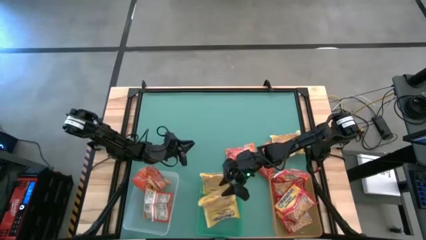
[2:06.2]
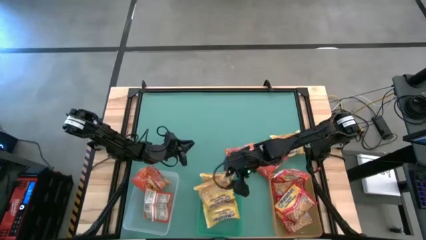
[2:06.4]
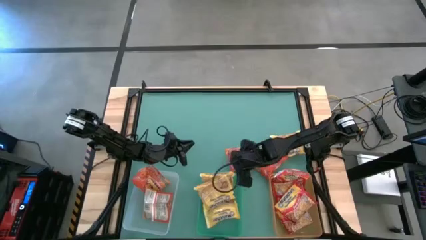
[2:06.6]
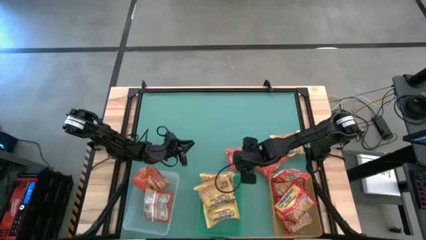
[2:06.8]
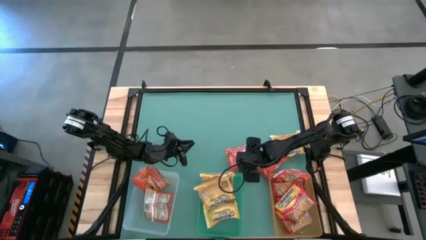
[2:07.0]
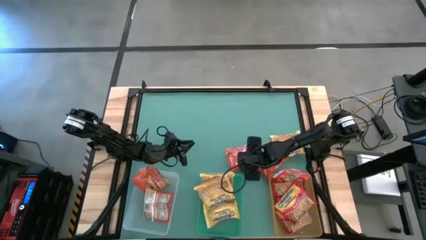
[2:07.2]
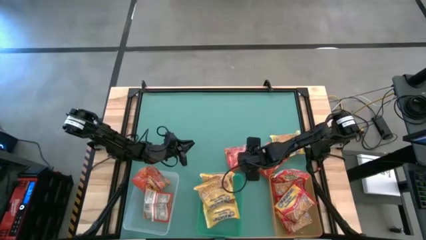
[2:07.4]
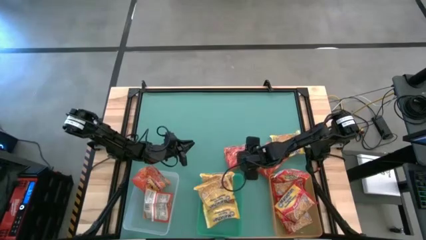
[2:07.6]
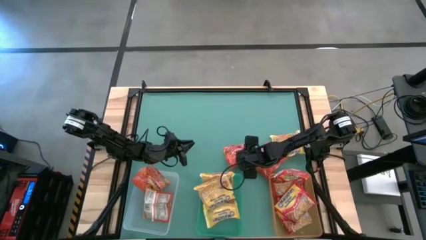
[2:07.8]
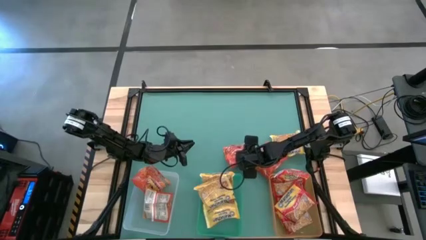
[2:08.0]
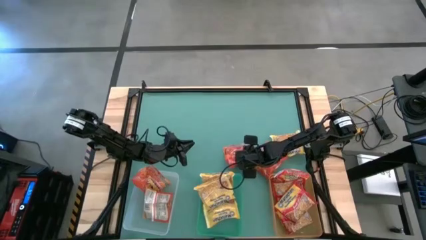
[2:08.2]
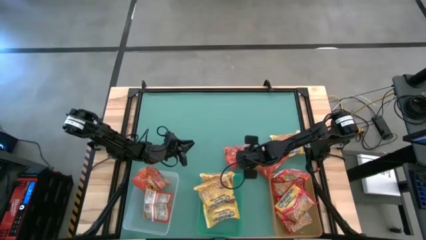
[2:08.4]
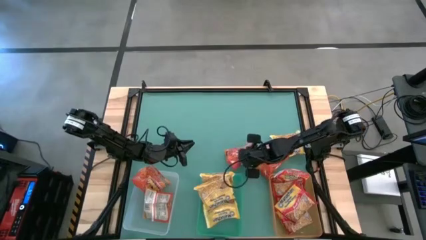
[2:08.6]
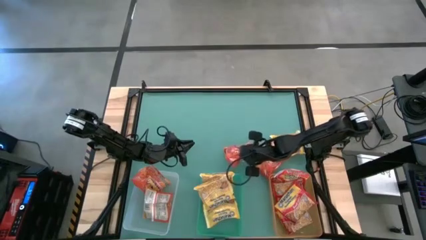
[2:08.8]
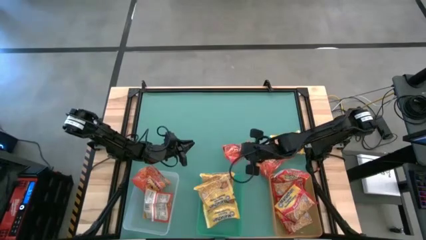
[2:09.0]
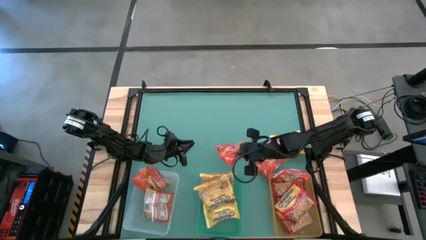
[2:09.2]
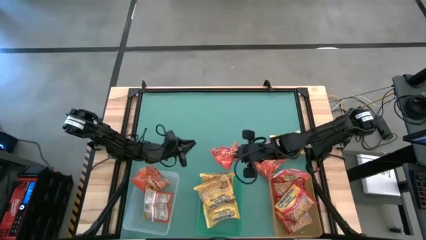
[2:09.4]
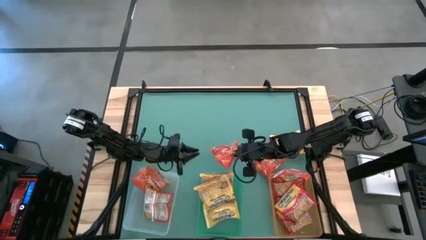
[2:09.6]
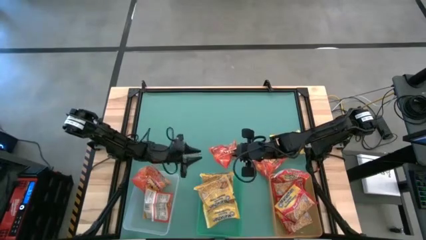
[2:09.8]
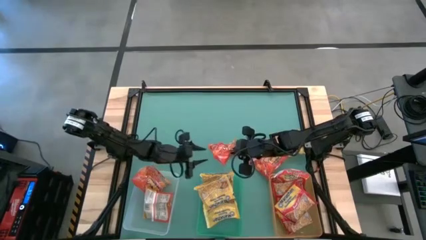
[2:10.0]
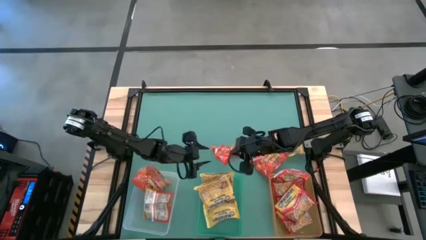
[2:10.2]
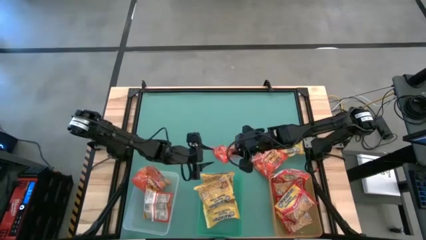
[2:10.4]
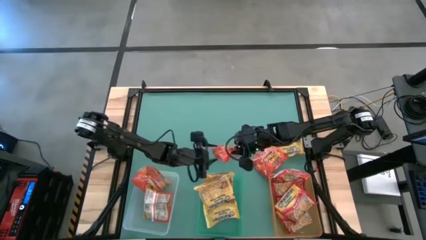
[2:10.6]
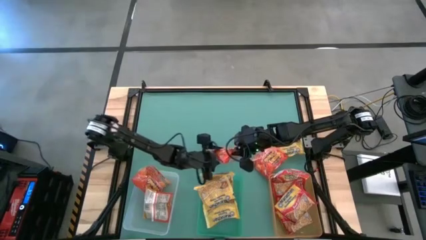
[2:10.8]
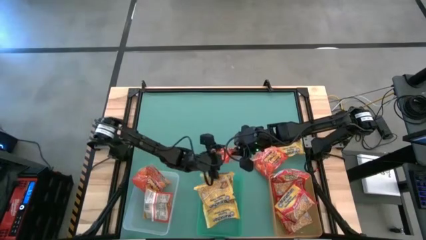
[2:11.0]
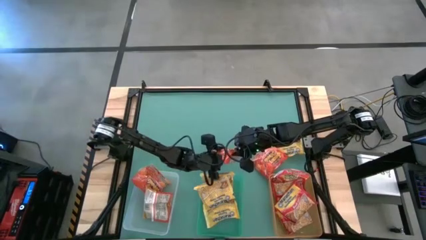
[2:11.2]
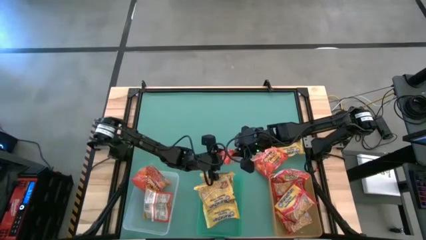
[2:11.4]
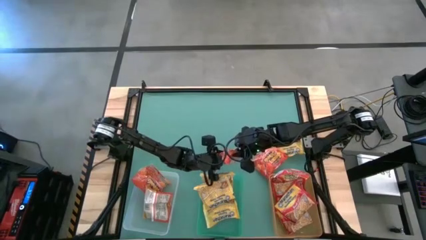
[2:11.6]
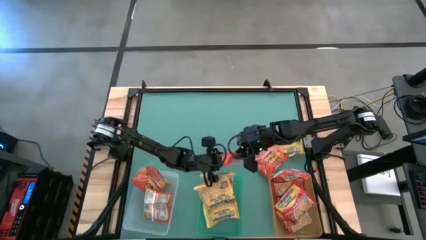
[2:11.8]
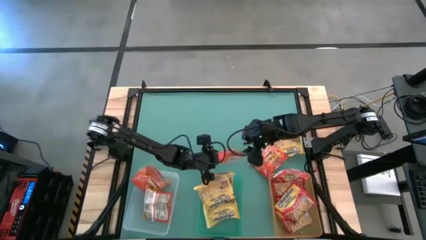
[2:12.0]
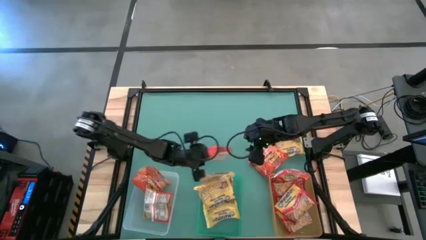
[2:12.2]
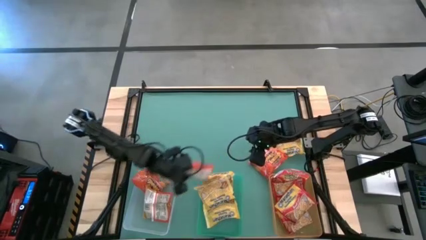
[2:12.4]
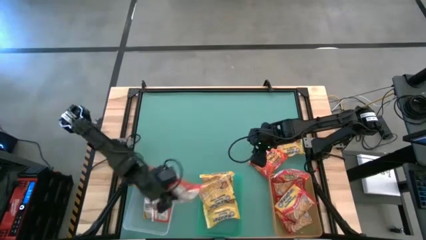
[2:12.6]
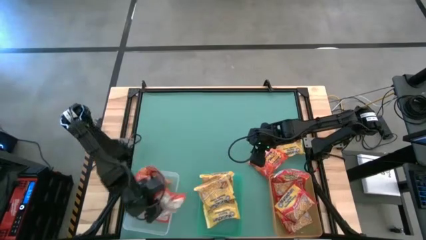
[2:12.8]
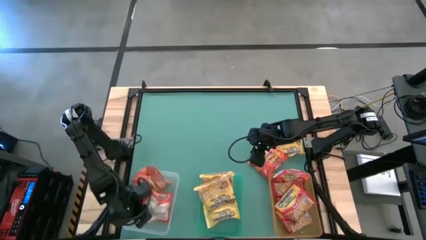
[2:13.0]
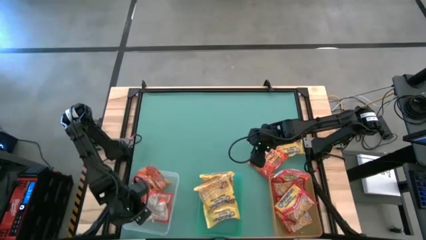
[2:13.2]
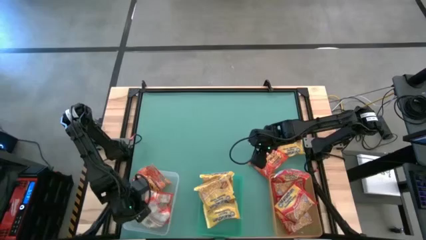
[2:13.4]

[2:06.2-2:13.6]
Task: Sort Maruchan noodles
Put the orange noodle pack into the white bin

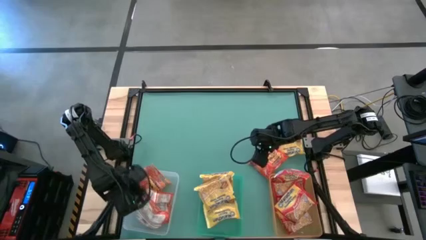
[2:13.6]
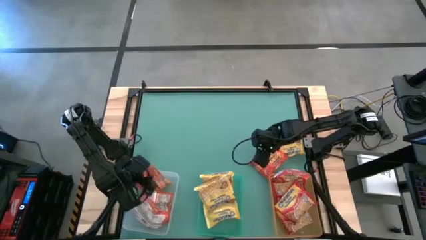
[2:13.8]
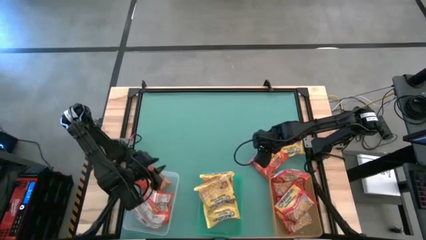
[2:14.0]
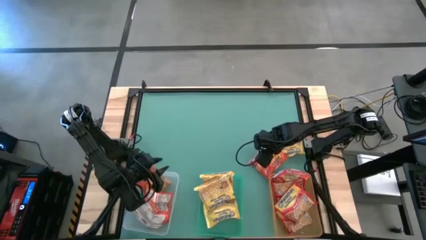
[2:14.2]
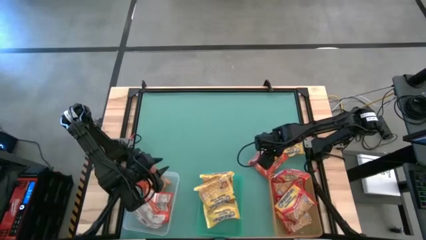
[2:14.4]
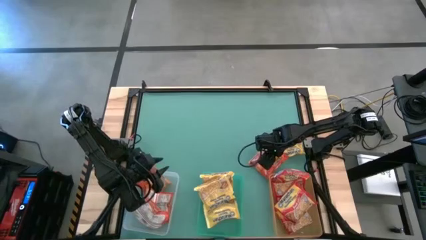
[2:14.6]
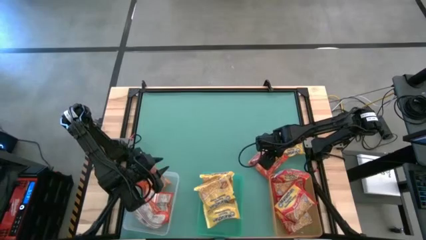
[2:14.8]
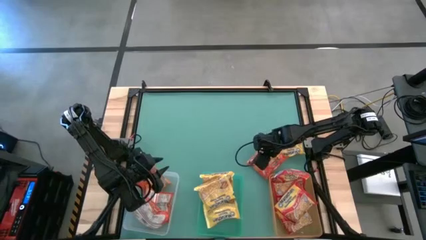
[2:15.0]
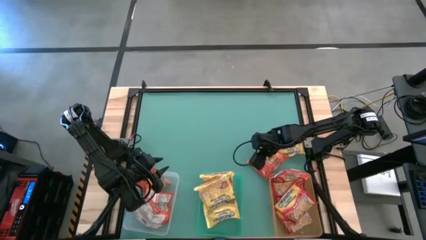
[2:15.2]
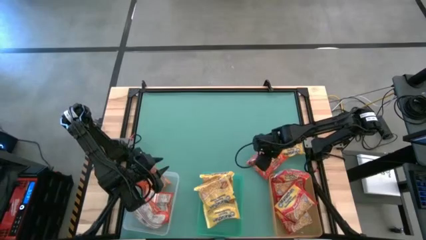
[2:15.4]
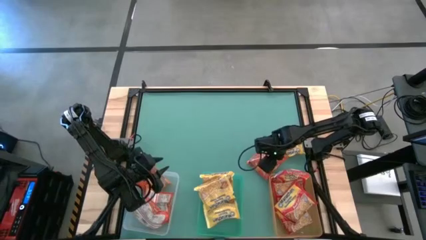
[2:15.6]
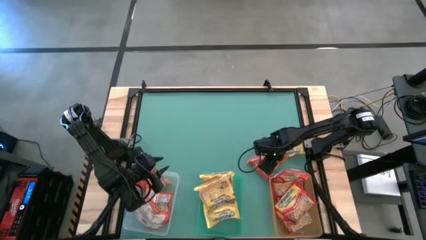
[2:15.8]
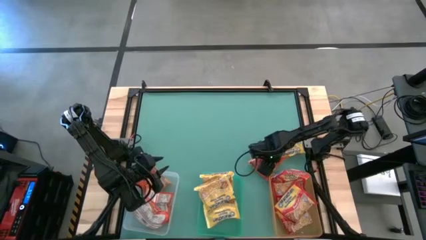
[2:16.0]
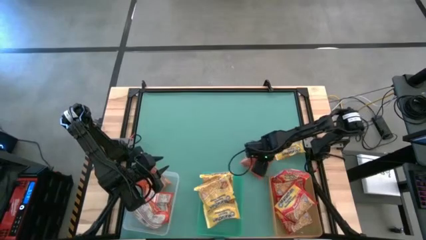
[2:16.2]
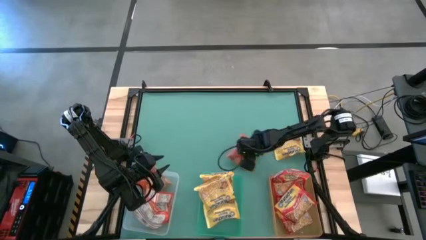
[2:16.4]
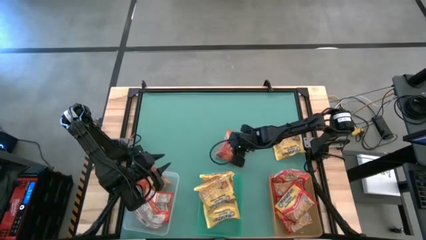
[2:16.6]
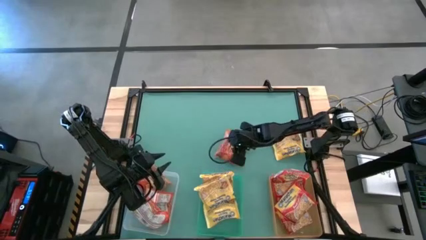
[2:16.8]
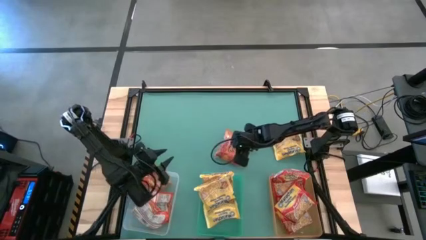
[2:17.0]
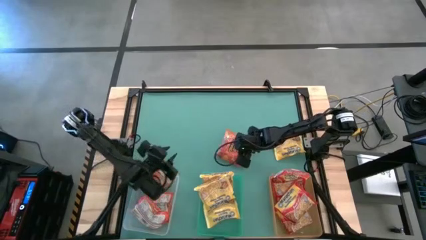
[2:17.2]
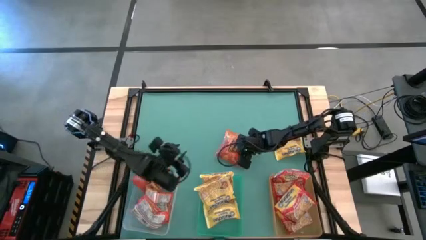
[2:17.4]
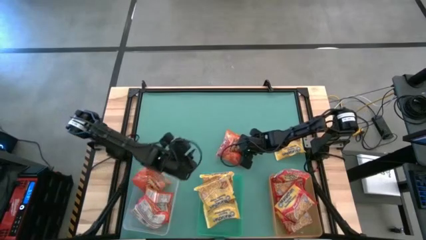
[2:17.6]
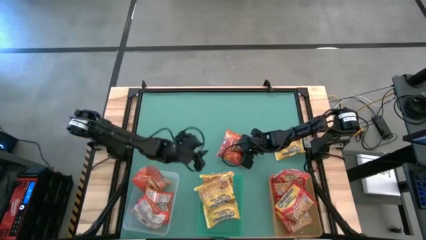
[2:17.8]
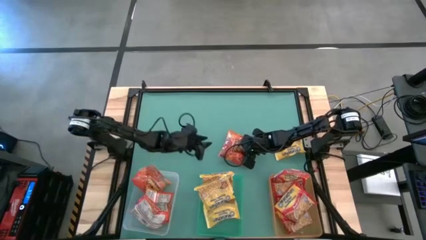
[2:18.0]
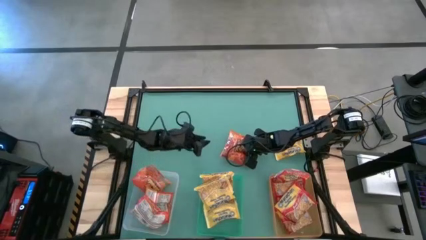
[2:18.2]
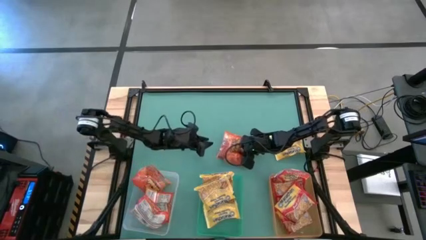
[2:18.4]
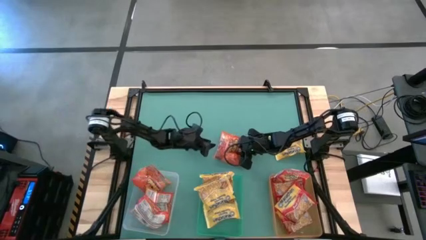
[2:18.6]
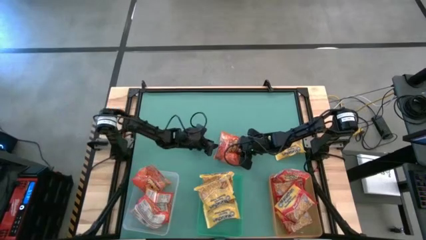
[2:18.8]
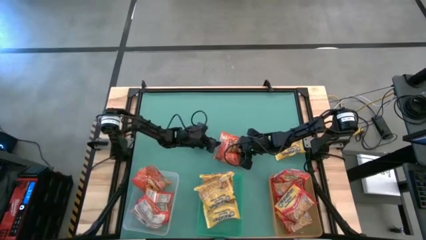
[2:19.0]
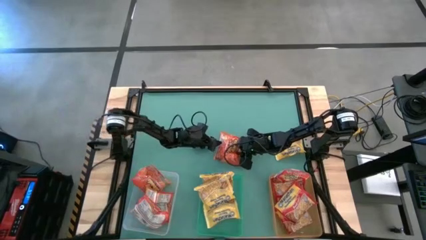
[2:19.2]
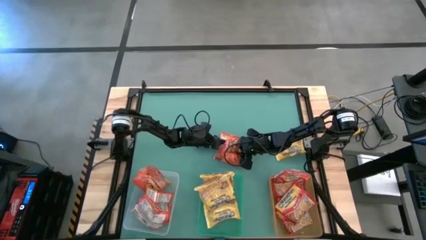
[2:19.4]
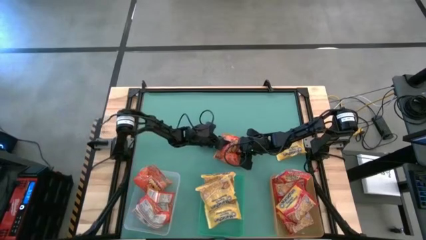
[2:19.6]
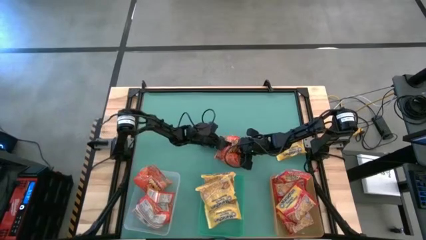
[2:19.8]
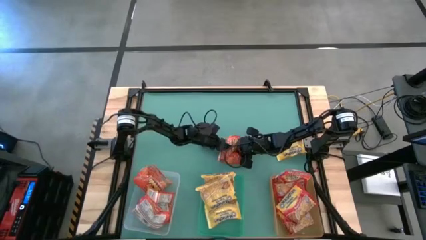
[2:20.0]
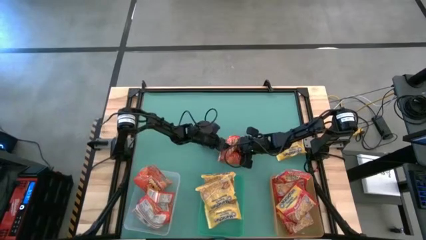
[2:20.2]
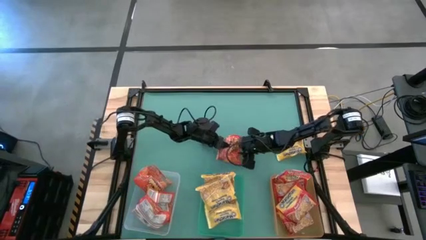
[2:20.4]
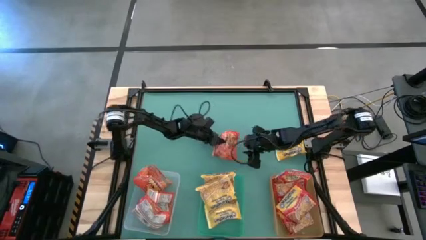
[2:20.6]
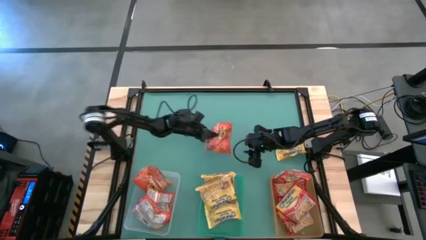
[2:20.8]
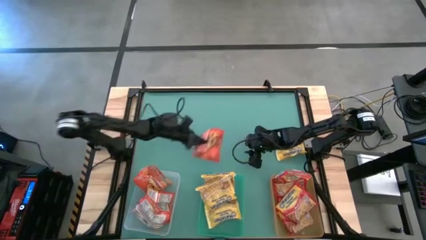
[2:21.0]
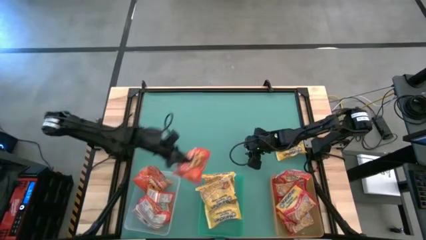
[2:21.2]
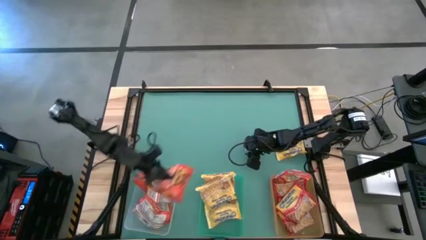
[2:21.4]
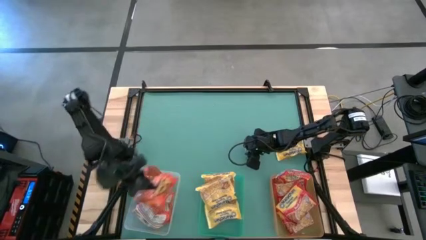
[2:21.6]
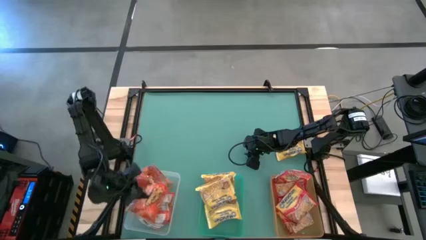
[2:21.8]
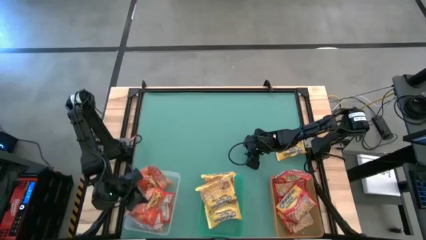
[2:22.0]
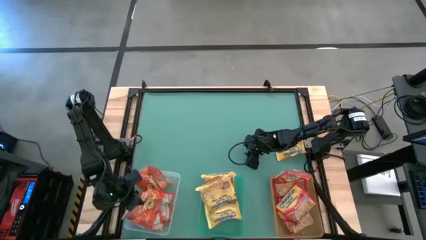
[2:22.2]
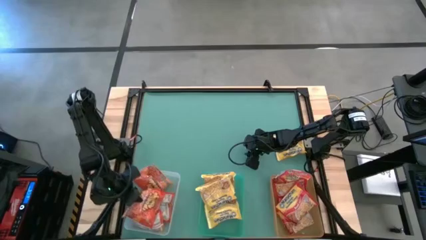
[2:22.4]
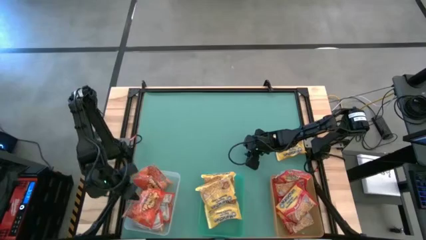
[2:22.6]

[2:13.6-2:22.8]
Put the orange noodle pack into the white bin
